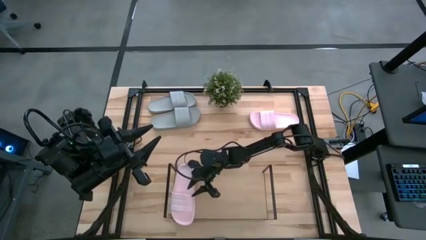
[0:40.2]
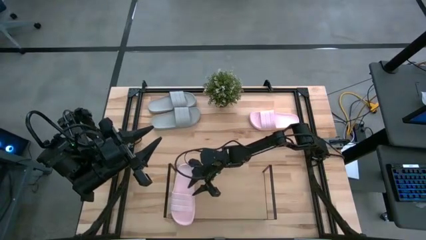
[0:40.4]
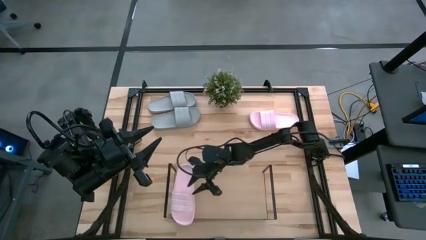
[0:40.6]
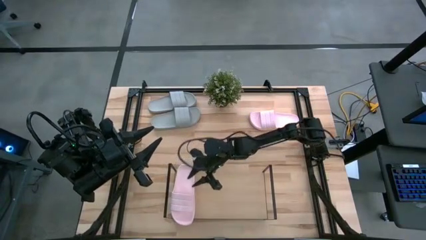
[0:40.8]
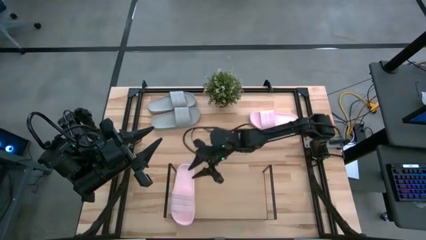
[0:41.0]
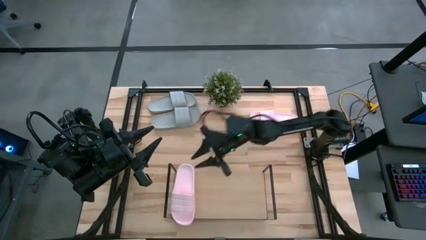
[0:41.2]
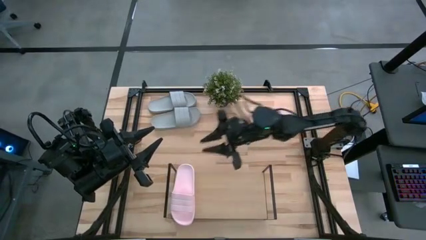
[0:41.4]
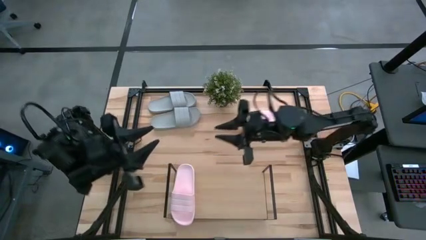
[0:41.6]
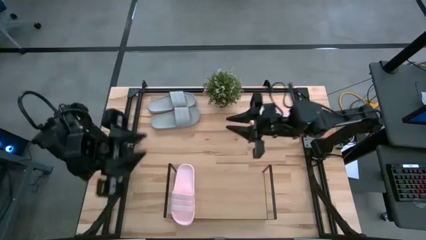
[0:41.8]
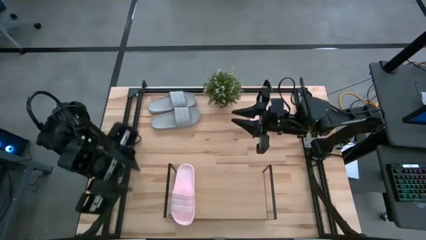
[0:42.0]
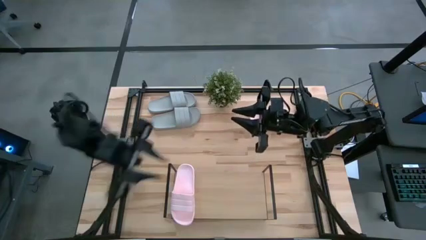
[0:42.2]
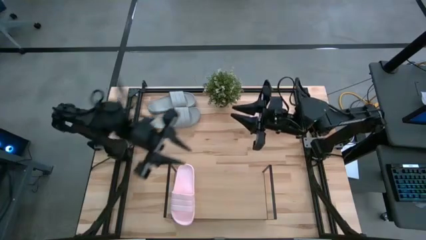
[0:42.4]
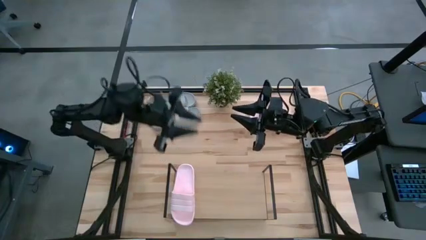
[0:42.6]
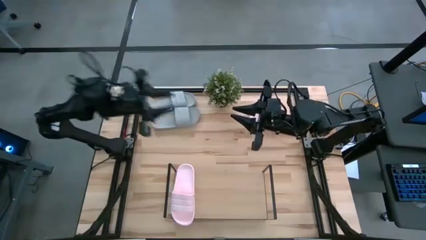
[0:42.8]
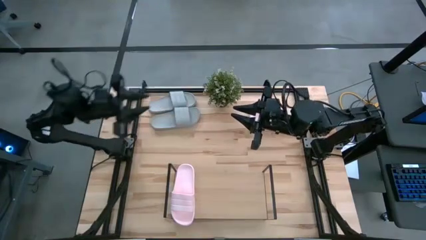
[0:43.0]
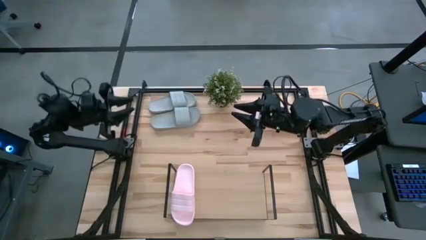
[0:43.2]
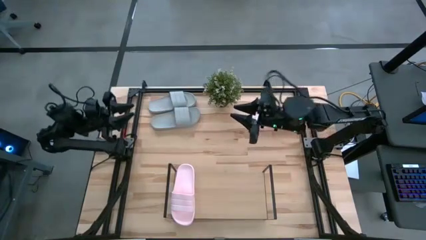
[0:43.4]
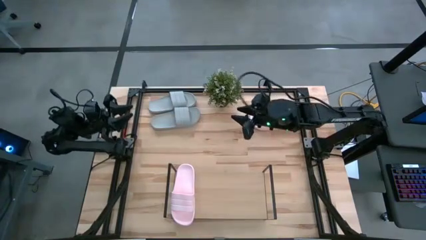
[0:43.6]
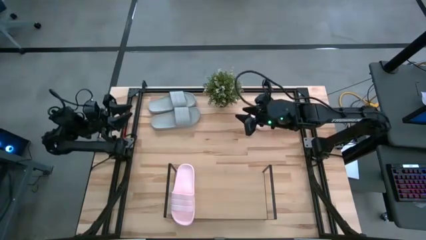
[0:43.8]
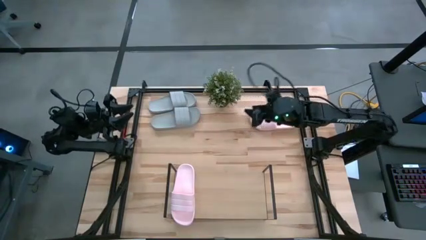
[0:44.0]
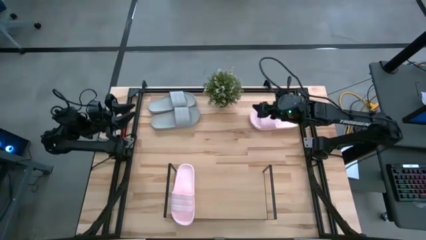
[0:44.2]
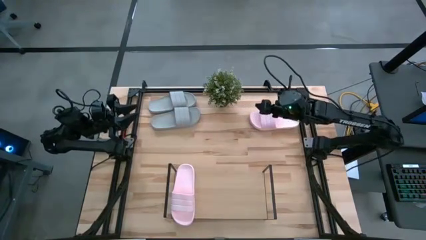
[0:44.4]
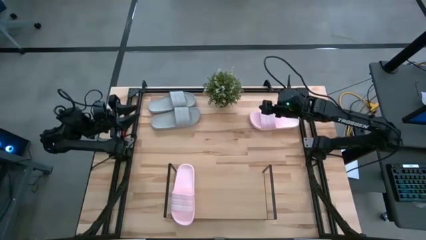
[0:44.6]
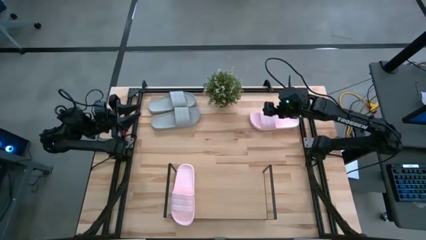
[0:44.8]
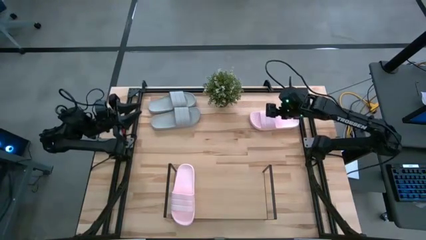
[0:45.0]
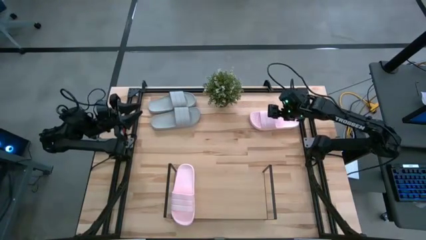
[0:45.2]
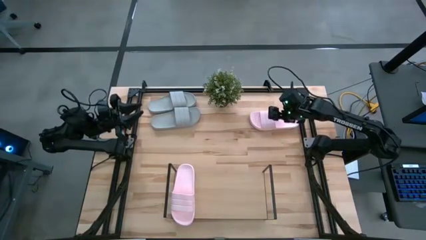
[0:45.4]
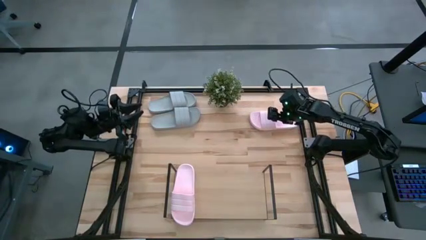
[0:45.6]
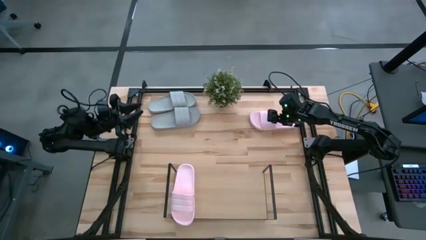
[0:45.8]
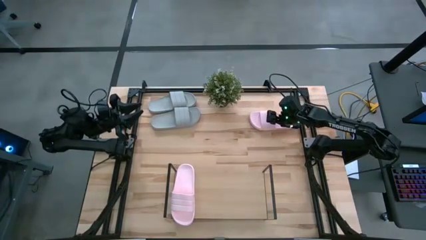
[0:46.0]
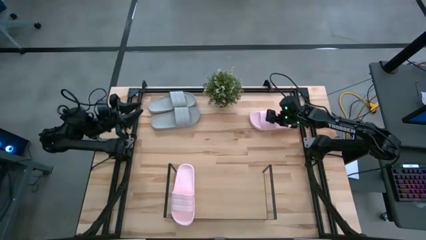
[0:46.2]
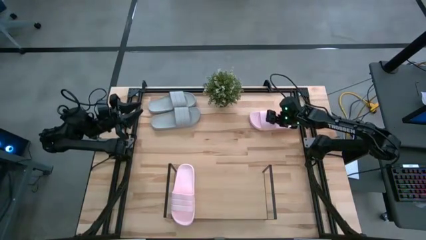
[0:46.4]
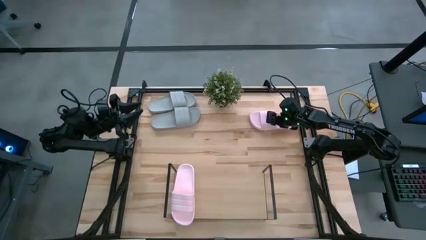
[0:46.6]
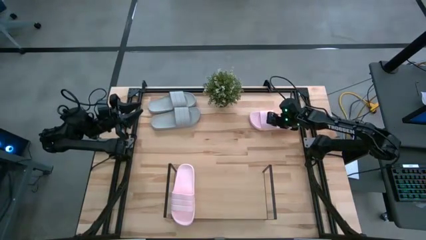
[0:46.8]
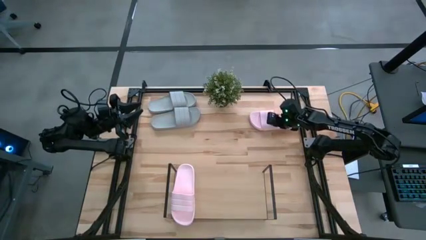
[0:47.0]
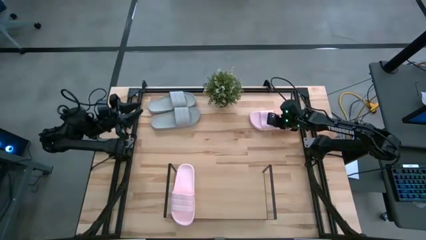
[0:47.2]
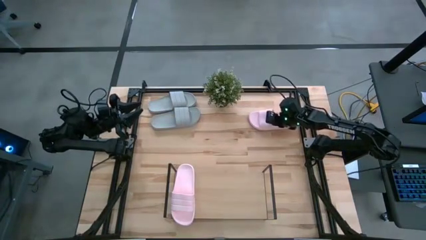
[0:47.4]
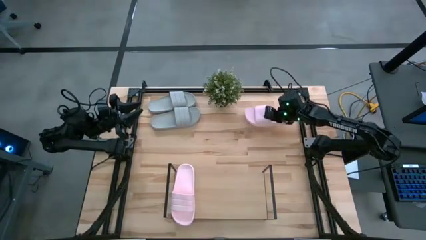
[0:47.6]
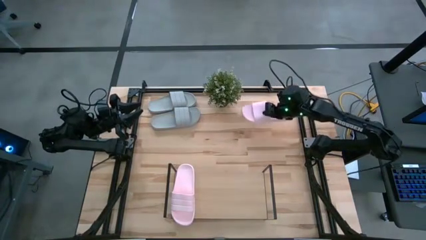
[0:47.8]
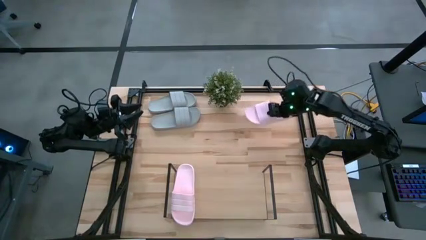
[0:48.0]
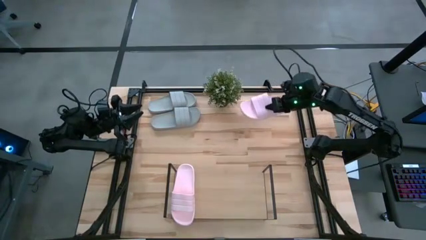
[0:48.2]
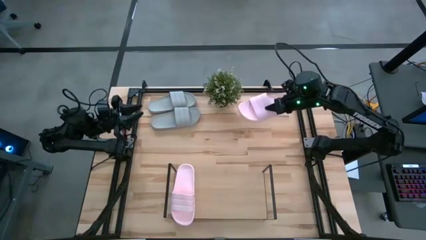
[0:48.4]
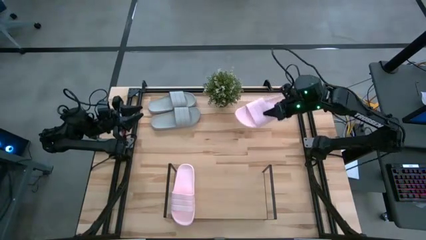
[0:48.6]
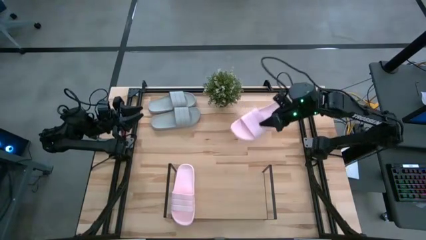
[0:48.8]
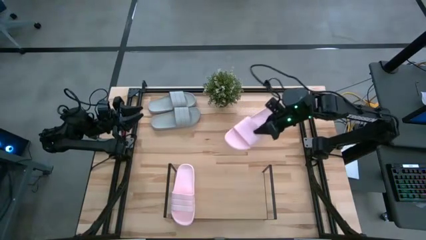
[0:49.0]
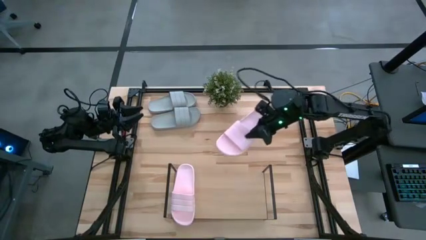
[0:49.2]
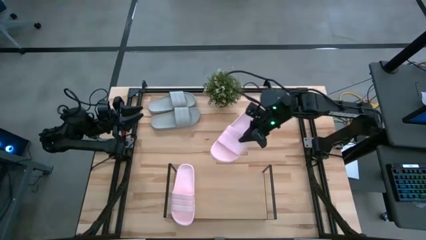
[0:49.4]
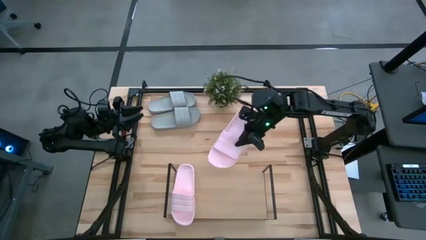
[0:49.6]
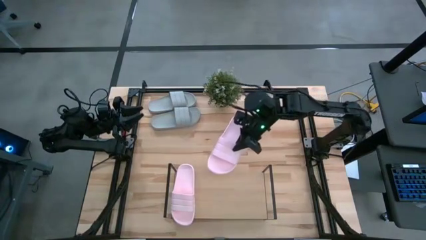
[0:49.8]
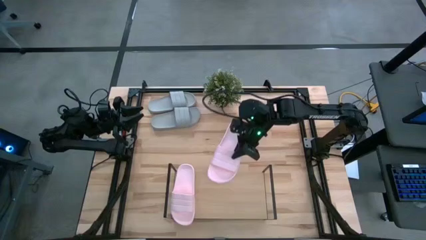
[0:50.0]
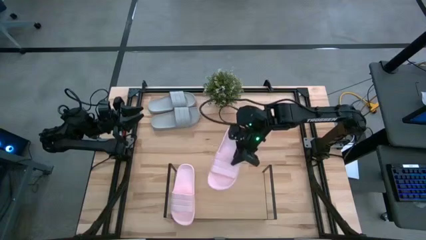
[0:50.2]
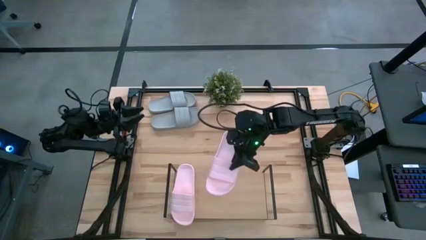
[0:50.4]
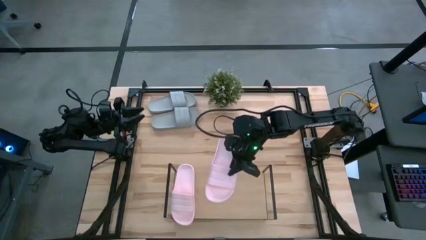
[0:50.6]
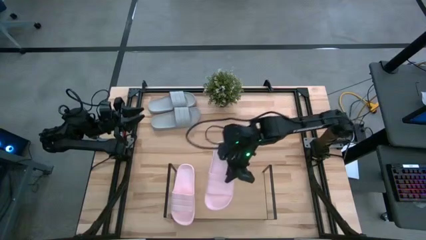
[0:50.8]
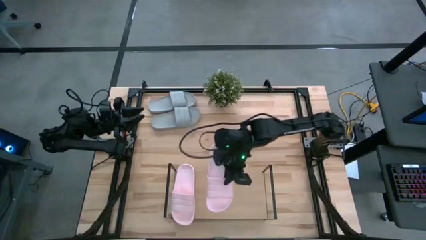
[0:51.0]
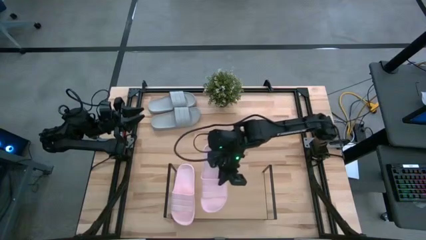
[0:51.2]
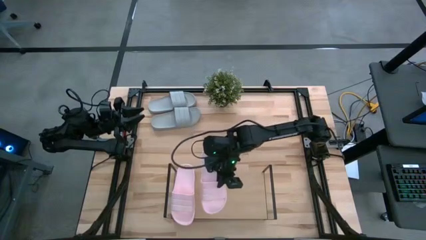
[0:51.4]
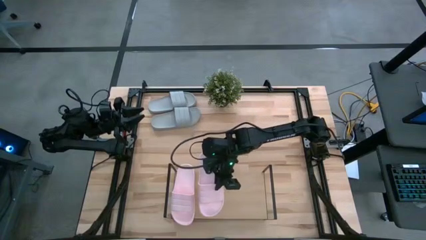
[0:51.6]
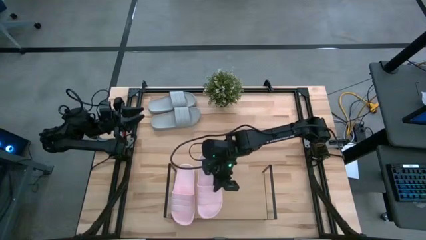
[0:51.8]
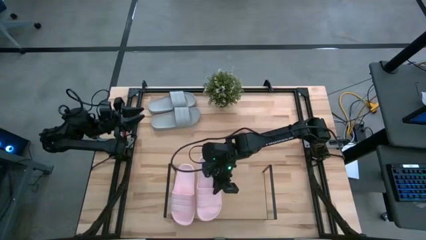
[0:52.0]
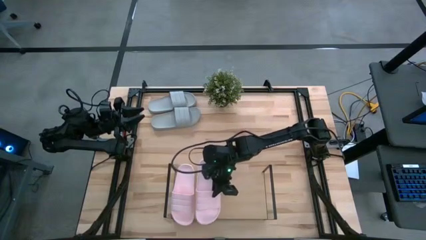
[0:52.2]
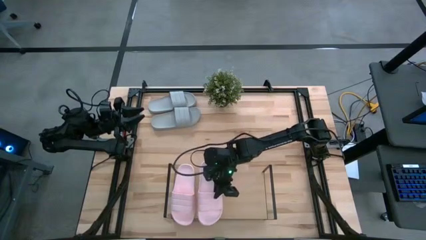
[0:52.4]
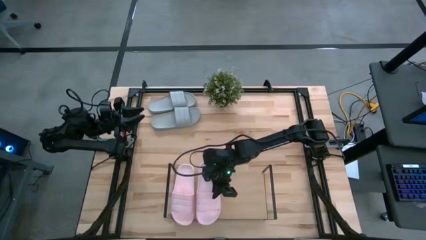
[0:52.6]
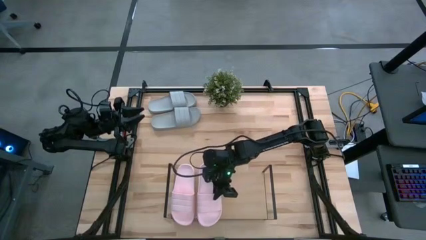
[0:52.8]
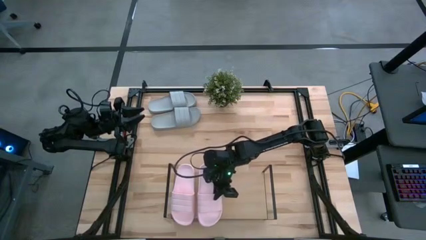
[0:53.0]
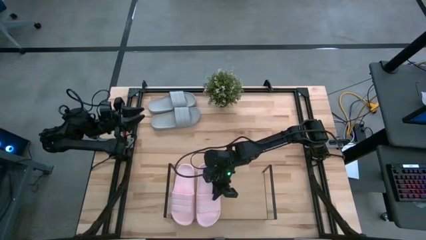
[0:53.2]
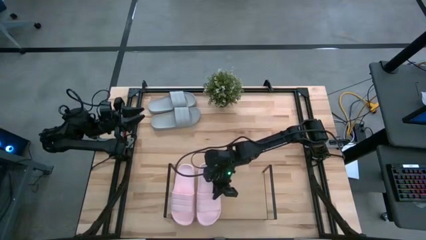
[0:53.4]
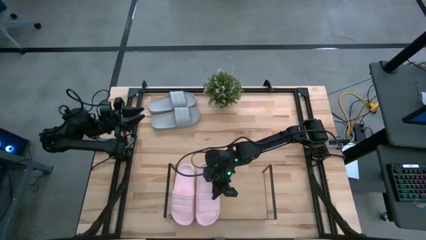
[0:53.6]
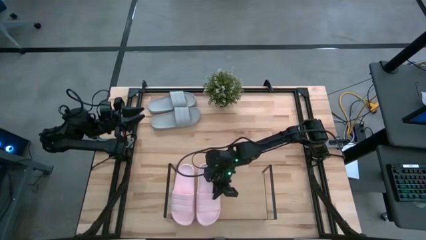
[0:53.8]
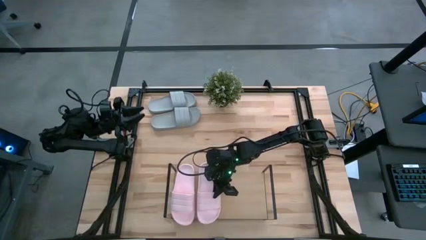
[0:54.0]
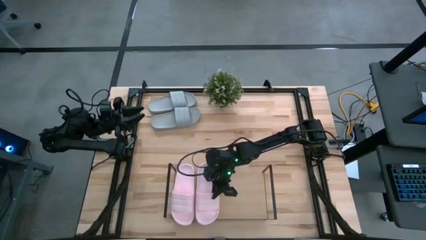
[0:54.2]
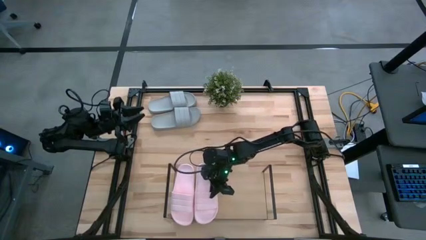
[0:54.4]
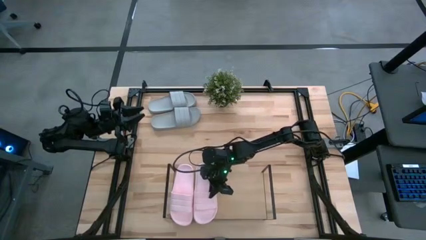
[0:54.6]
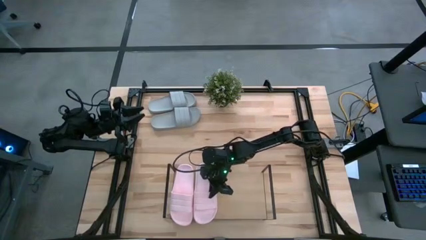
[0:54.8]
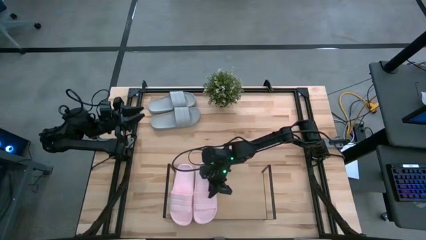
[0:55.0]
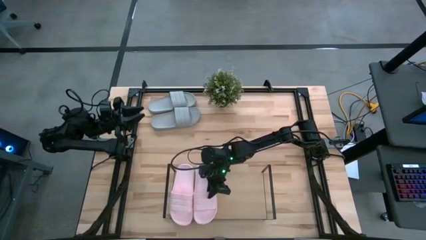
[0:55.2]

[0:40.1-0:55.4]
Task: Pick and place slides into the shelf
Put the pink slide on the shelf
